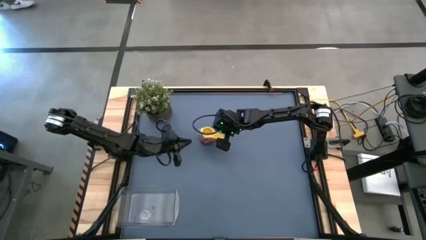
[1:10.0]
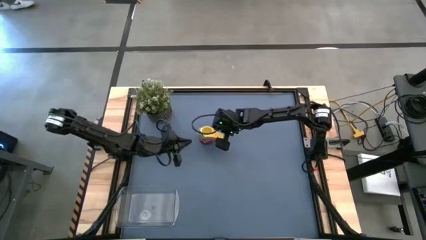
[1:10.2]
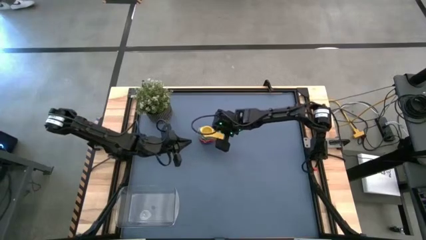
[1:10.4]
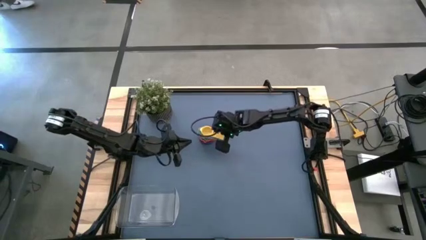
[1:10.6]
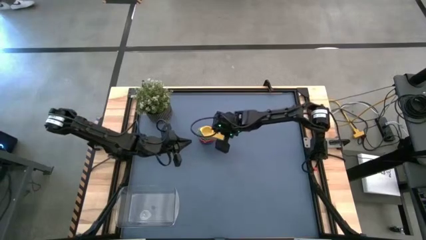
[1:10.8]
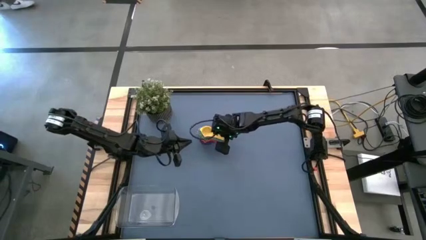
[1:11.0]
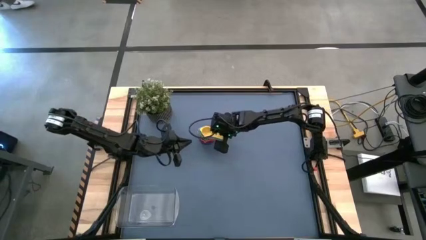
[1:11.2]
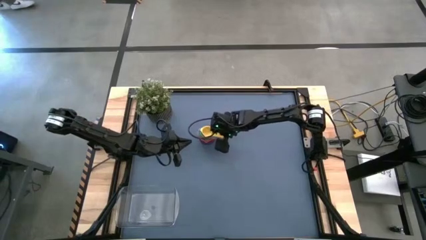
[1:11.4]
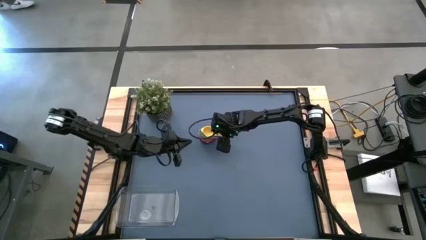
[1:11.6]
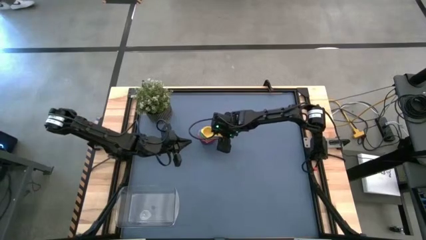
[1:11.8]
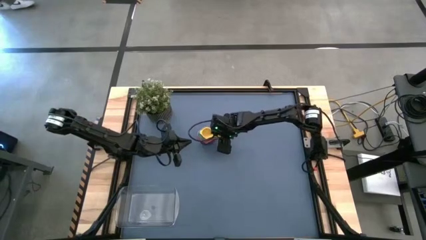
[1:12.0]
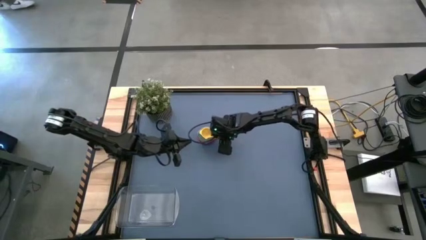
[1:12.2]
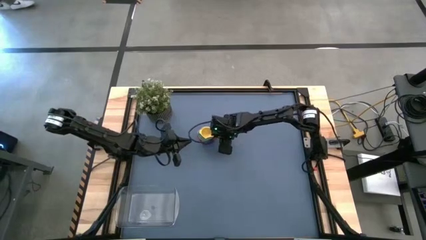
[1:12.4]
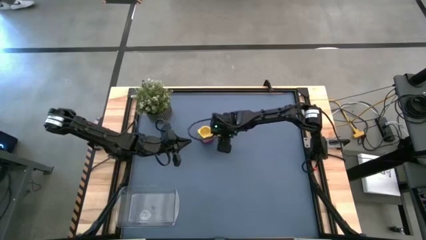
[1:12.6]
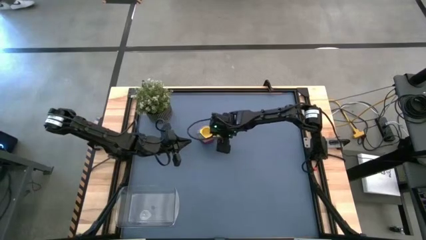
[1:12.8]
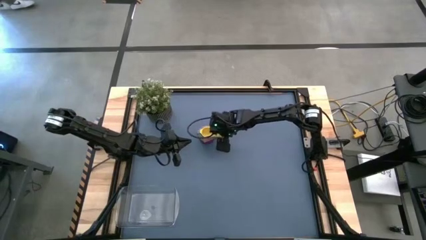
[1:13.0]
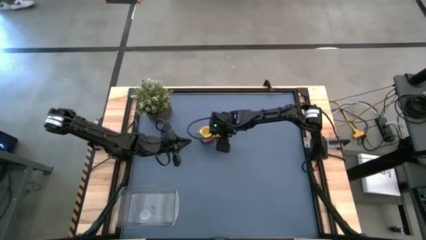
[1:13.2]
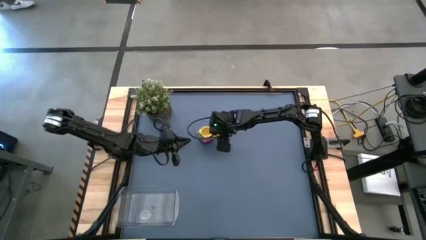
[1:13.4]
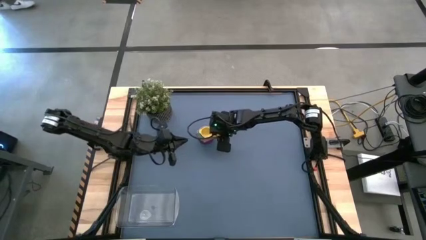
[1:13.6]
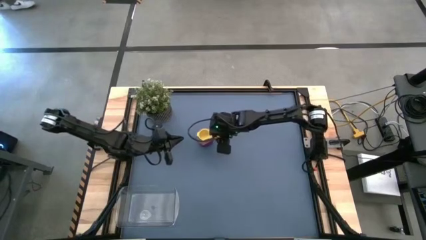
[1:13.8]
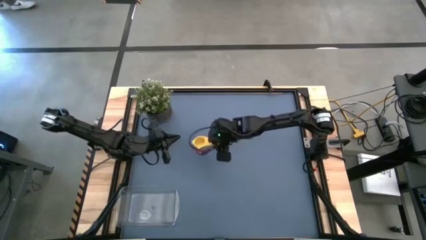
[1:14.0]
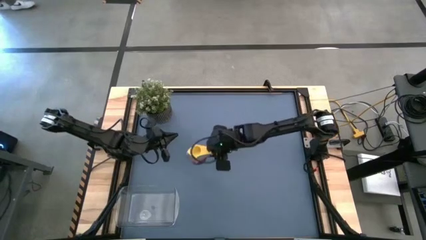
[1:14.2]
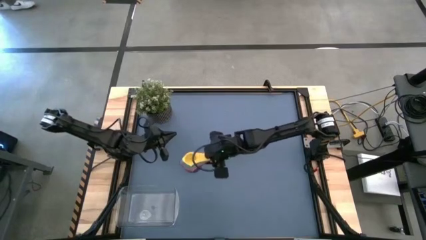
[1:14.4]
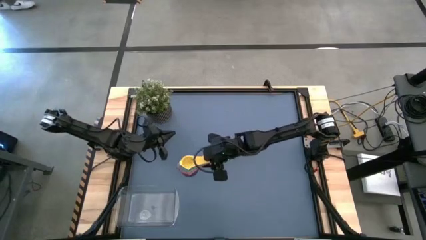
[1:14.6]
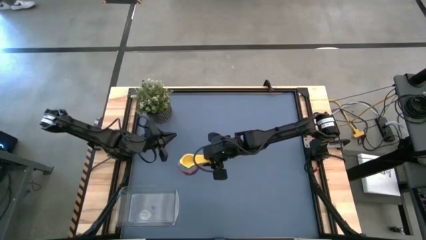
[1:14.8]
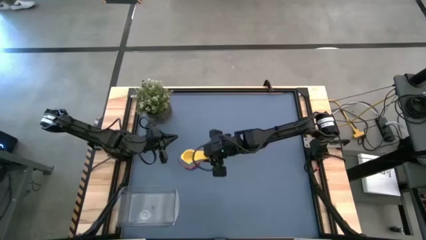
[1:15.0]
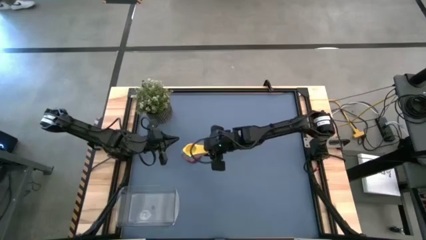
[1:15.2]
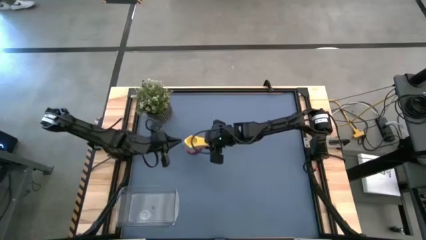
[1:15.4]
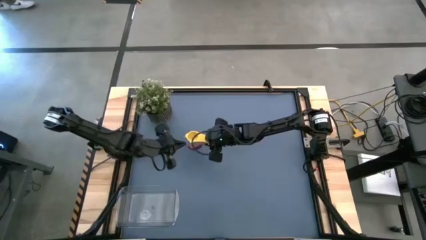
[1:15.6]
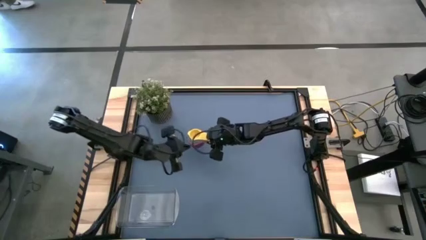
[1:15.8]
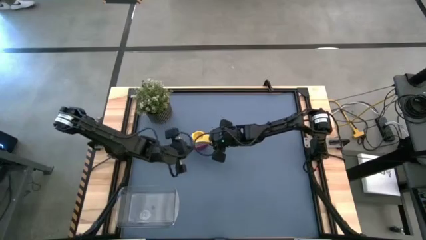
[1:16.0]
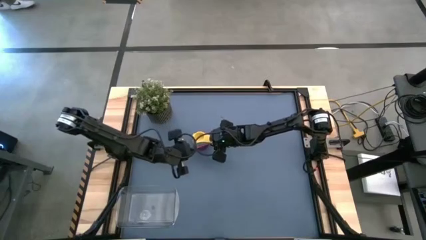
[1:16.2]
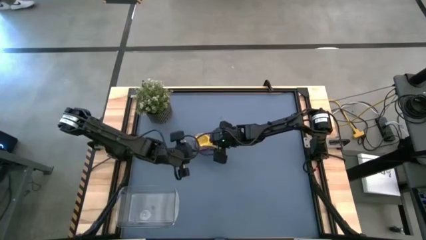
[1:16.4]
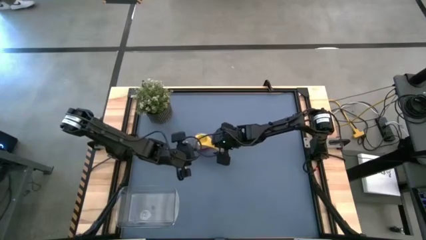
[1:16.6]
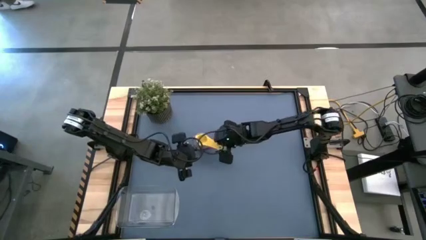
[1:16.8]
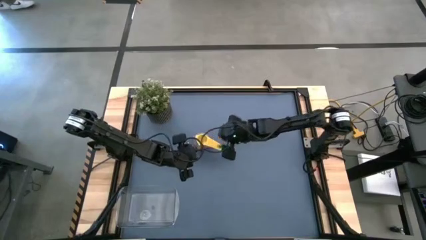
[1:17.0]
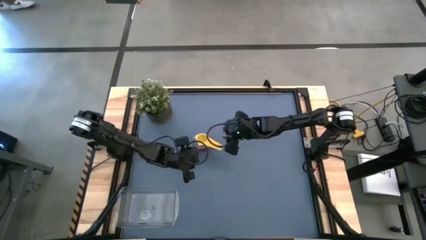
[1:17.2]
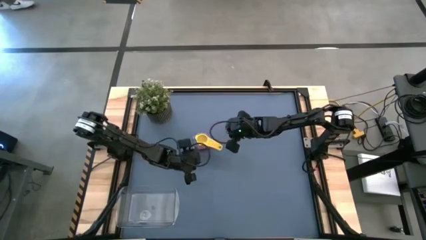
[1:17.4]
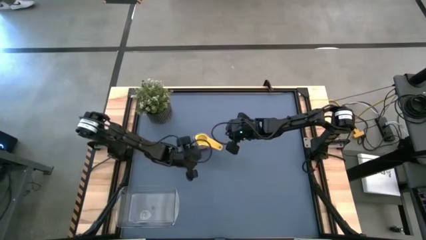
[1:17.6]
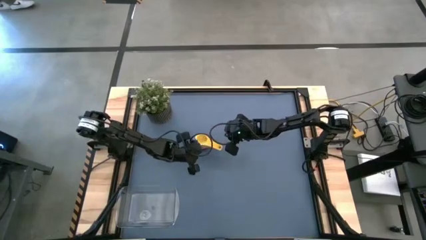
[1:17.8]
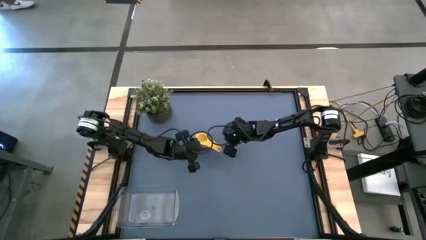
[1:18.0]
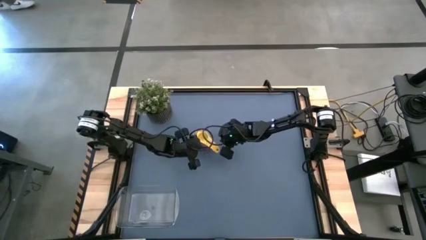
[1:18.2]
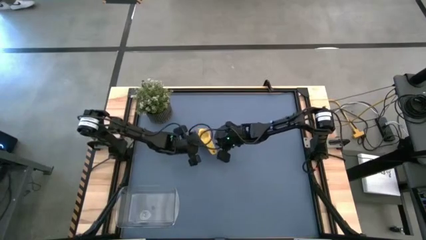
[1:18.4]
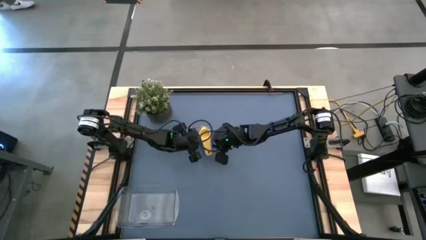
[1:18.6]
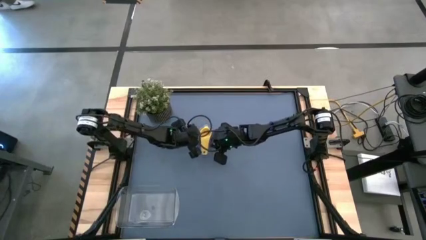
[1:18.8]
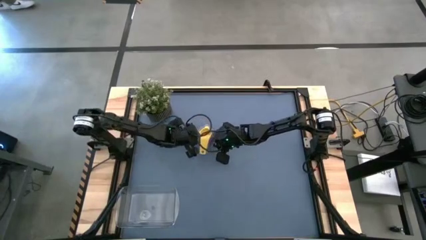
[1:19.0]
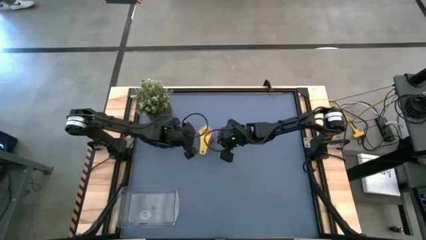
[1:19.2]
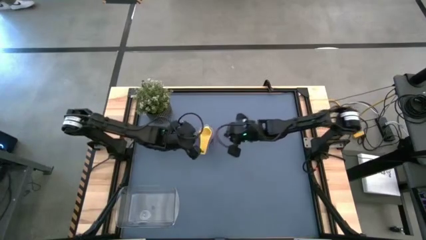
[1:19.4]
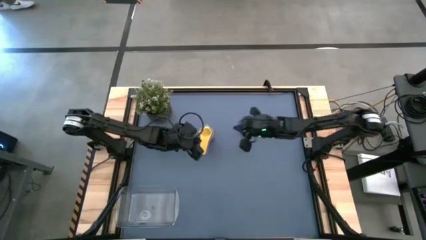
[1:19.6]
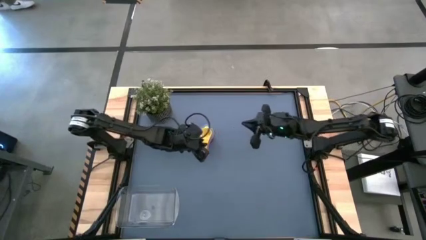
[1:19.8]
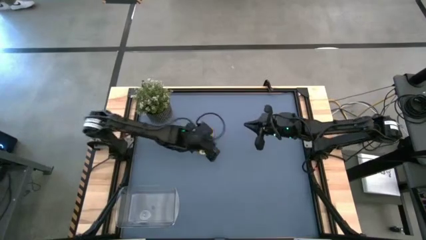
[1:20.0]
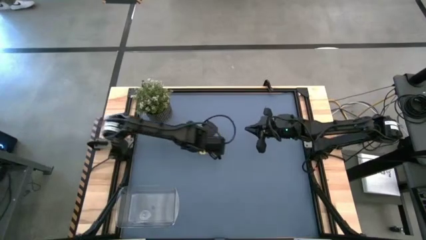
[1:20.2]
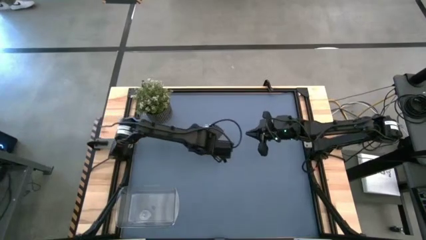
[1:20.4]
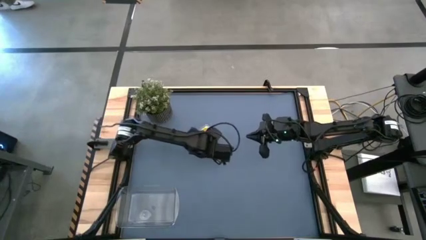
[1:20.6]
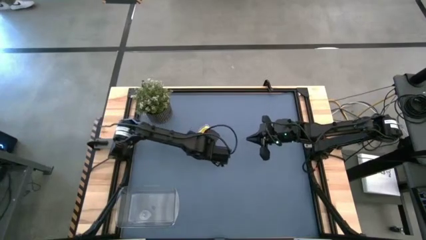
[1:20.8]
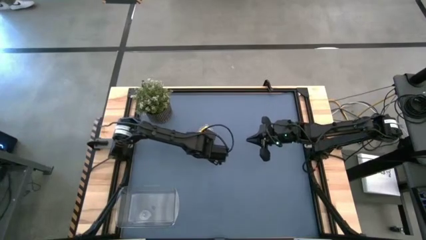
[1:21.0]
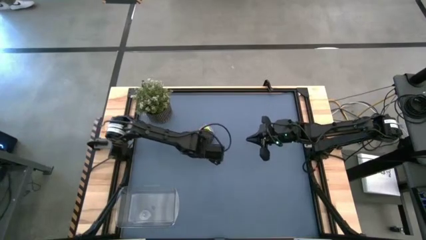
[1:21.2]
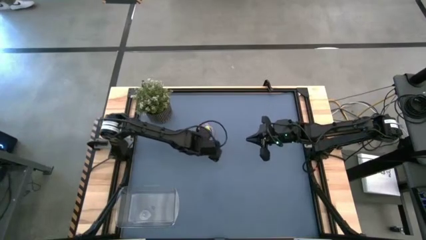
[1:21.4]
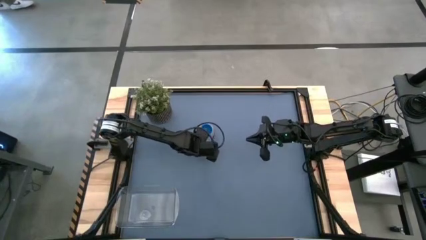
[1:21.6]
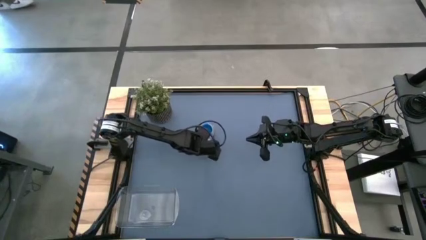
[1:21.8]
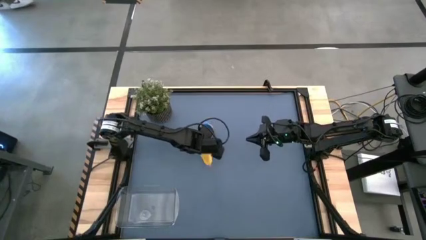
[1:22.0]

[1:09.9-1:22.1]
Task: Nest measuring cups in basket
Put the stacked measuring cups into the transparent bin
